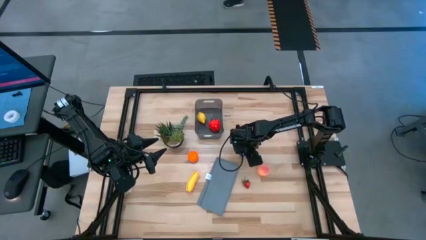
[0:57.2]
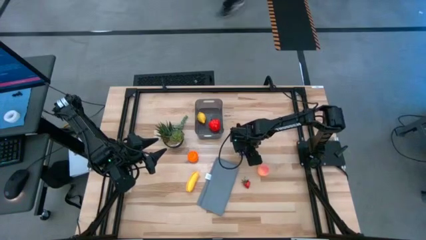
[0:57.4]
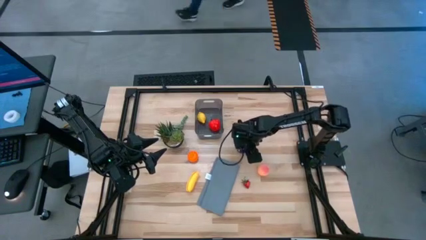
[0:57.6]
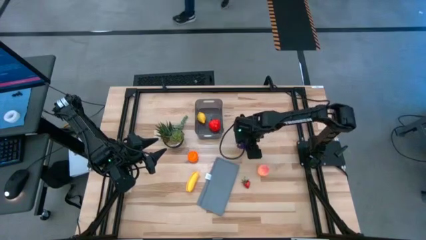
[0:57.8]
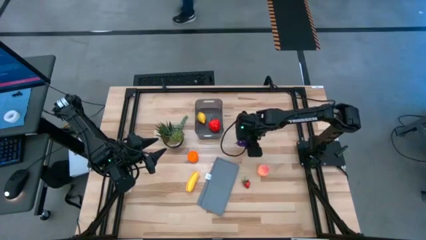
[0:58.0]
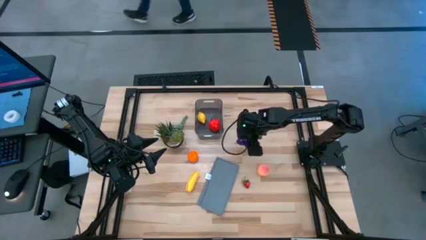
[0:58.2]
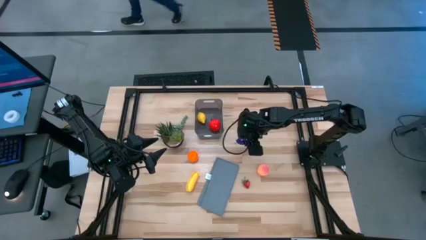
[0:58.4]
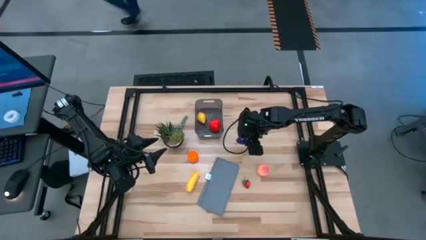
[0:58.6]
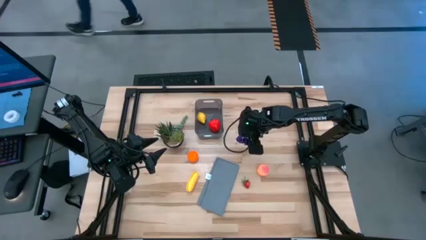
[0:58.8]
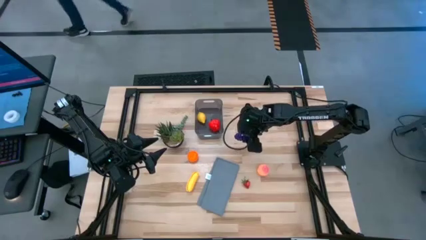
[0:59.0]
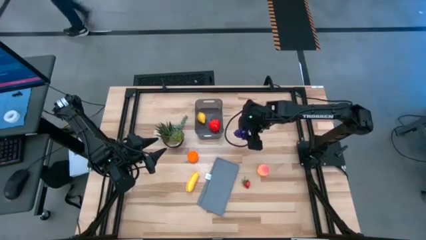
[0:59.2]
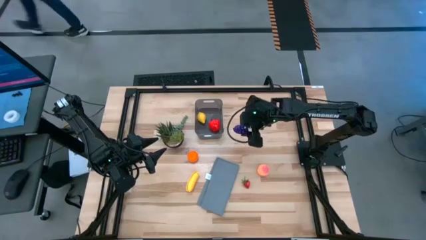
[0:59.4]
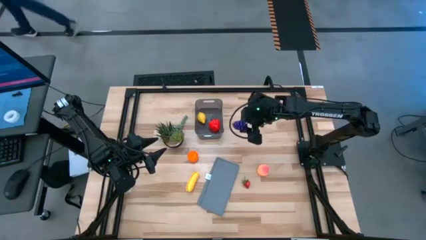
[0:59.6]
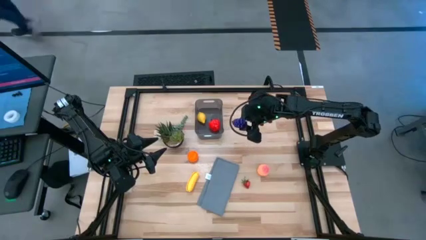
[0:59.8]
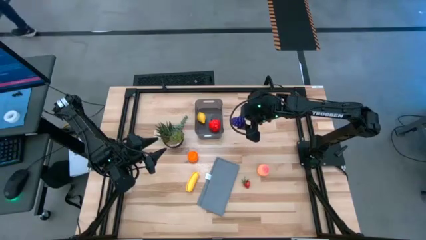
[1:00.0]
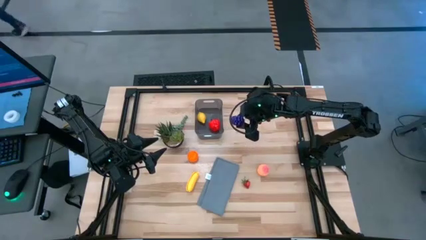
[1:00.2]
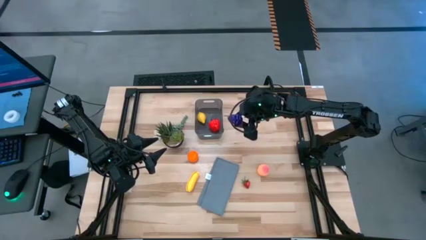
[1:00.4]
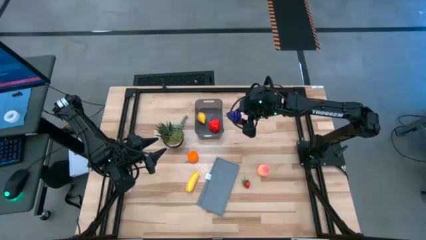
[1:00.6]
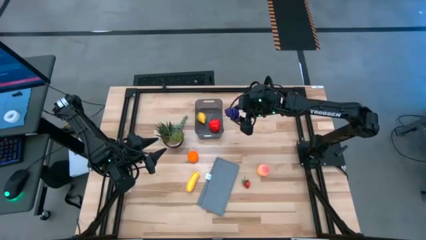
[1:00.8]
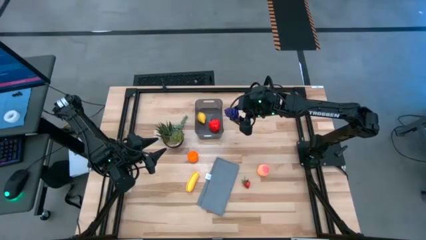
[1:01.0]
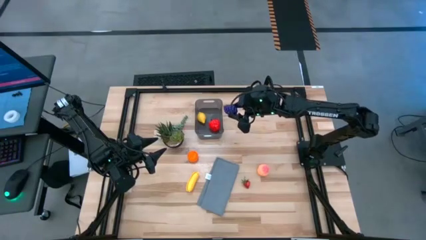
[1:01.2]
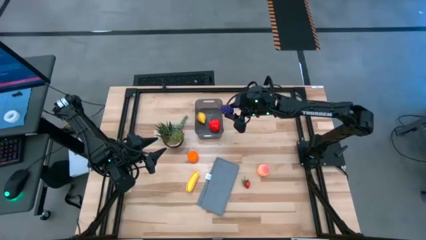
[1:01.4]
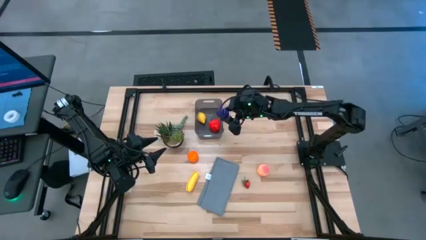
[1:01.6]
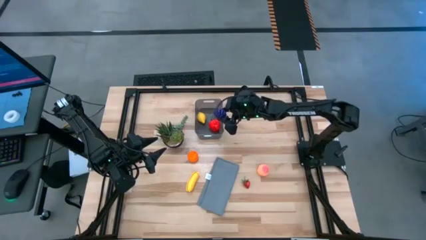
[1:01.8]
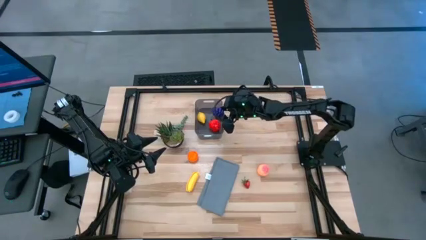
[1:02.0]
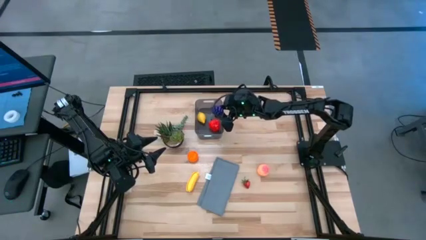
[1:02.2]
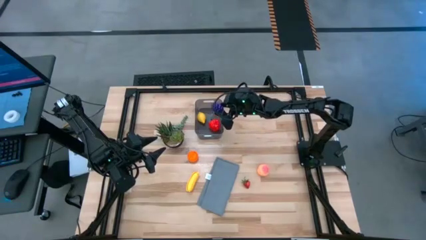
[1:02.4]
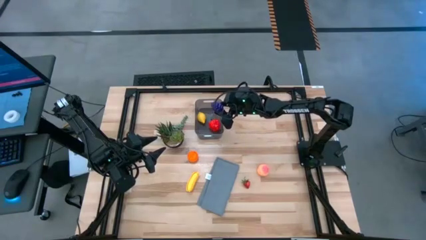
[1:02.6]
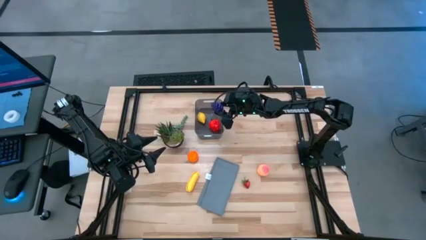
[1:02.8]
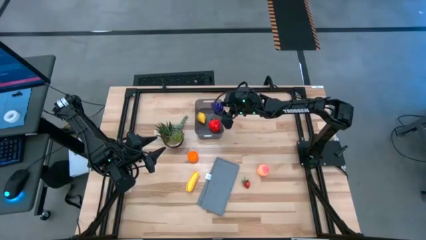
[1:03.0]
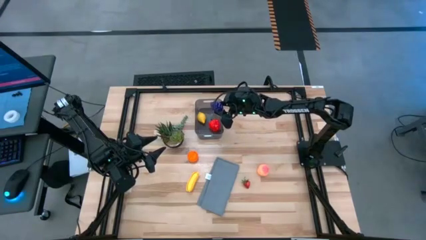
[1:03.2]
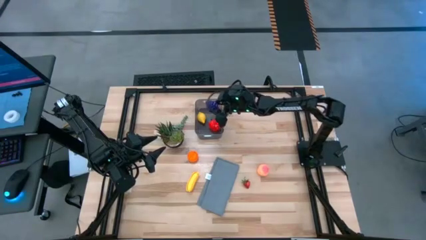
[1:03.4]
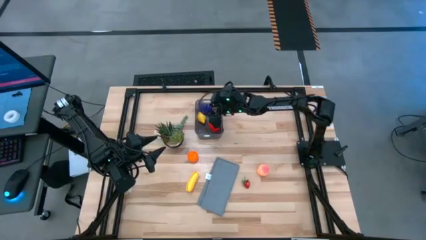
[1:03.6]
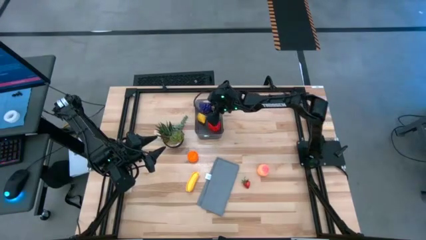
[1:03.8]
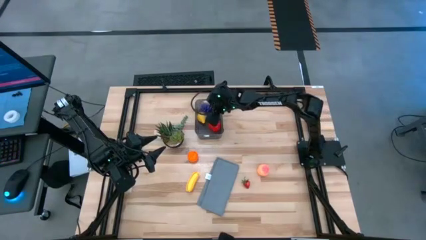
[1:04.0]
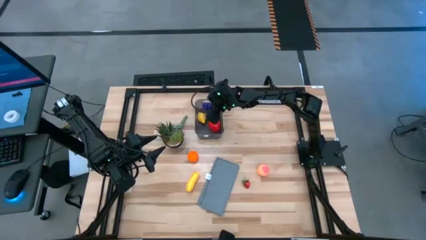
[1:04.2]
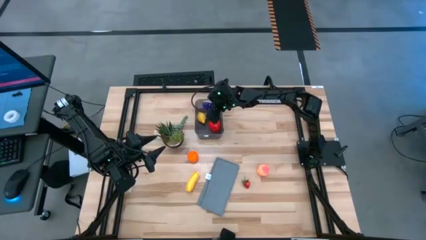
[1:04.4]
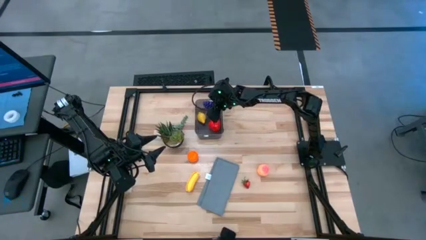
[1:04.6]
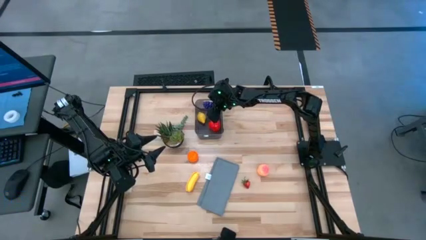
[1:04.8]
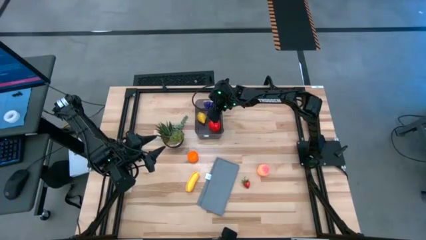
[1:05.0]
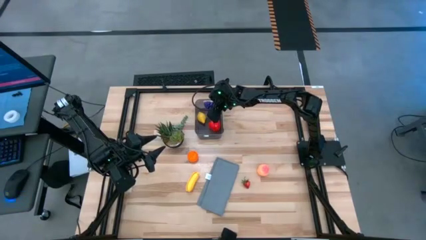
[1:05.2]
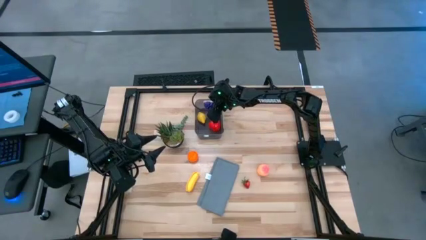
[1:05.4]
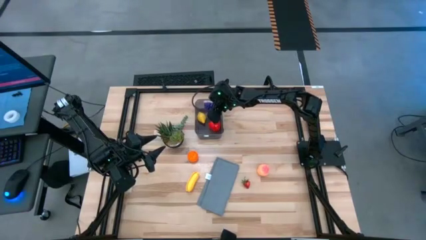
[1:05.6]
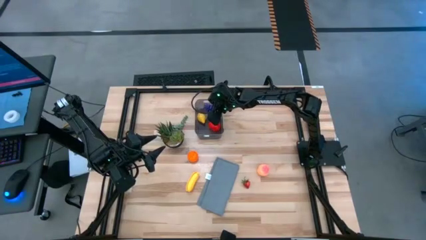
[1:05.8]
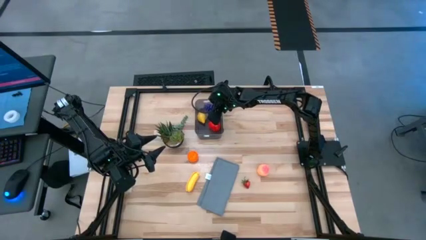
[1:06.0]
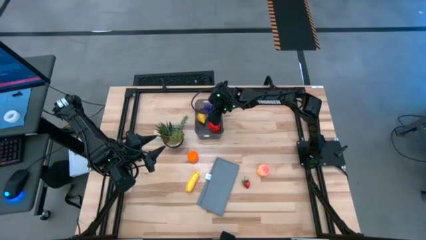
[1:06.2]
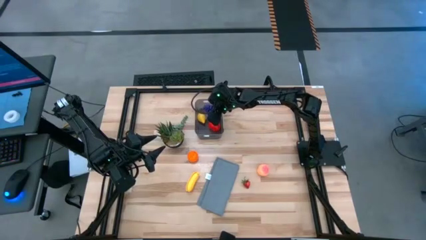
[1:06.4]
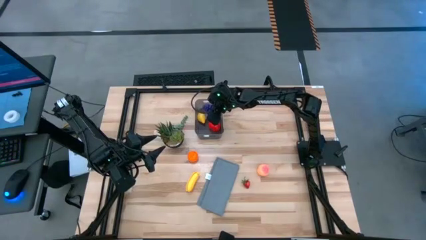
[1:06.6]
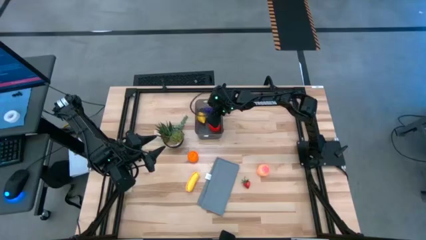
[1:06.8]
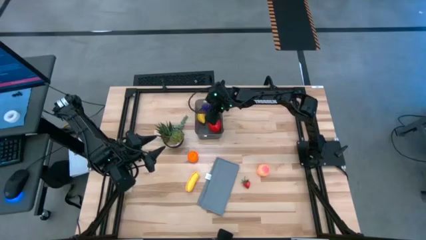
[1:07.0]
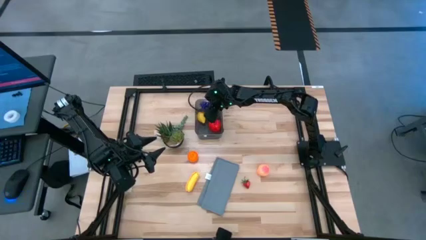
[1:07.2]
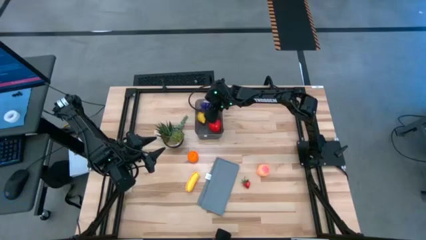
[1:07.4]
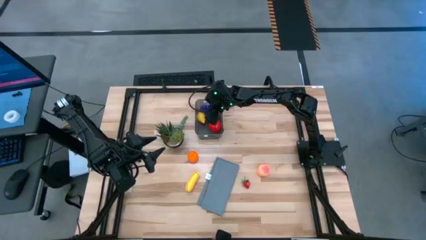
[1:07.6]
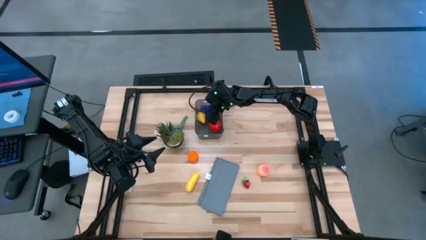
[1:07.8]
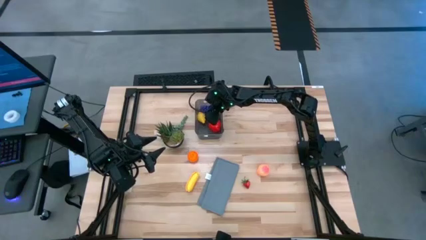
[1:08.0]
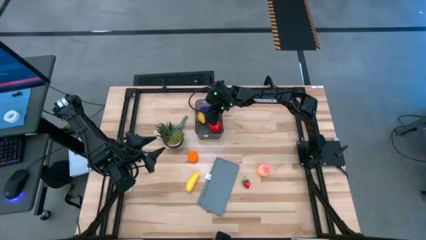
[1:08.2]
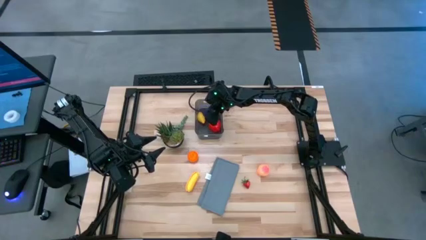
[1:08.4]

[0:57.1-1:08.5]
Task: Pick and placing Produce into tupperware
Put the blue grapes into the black bin
